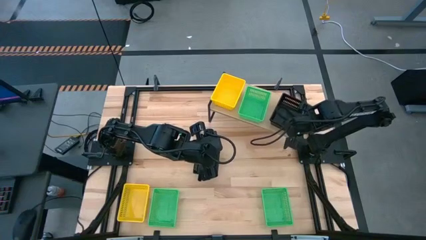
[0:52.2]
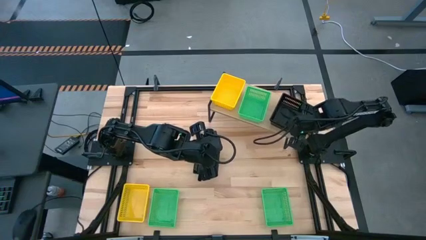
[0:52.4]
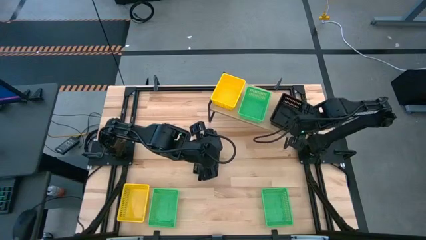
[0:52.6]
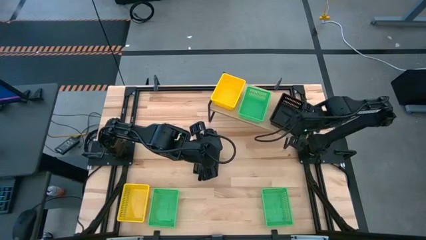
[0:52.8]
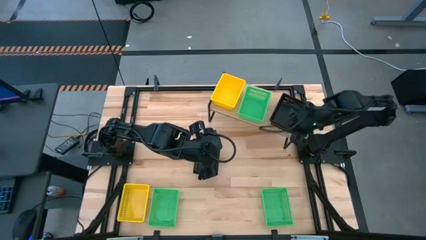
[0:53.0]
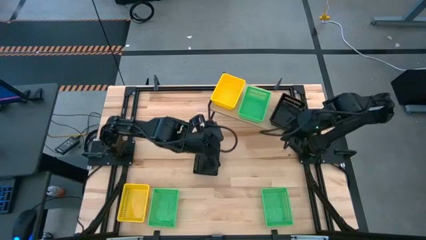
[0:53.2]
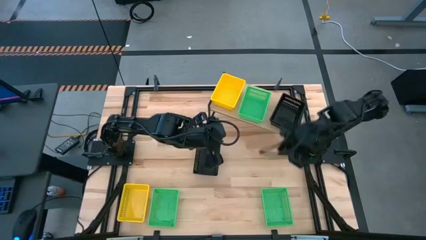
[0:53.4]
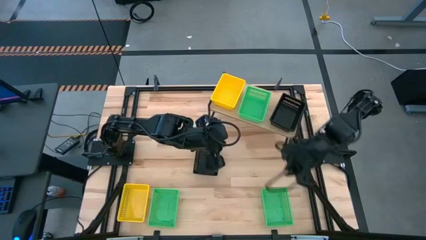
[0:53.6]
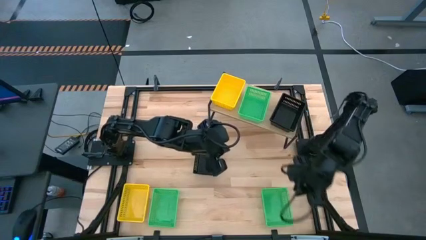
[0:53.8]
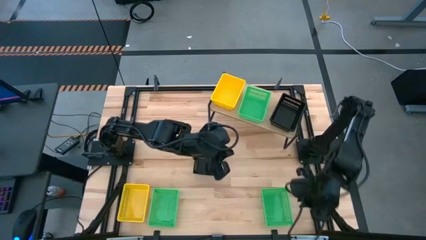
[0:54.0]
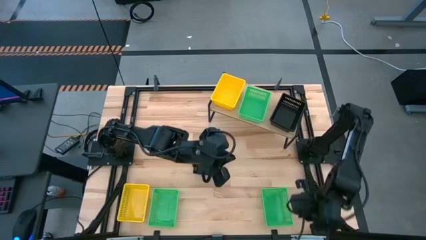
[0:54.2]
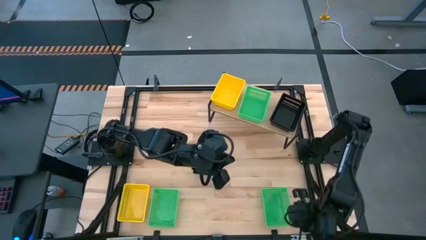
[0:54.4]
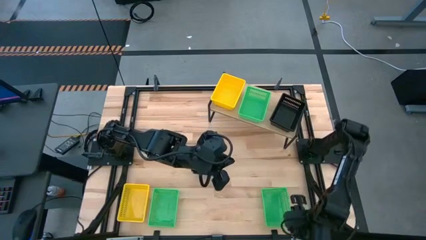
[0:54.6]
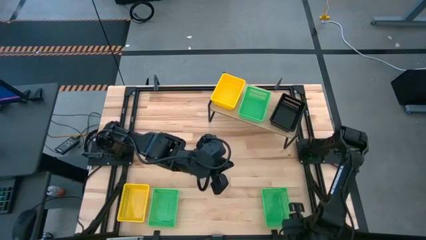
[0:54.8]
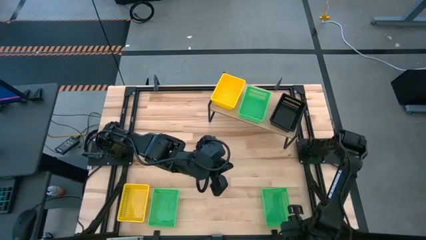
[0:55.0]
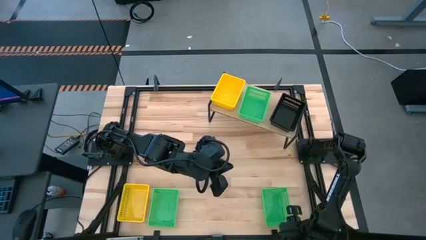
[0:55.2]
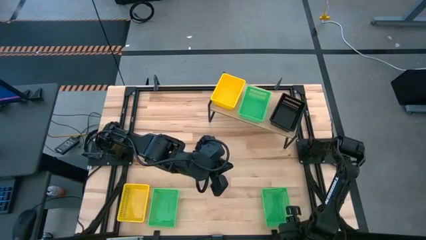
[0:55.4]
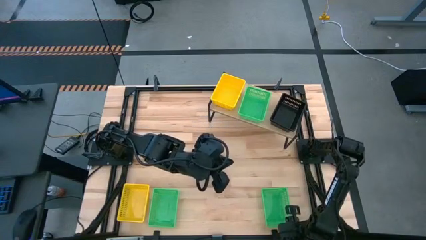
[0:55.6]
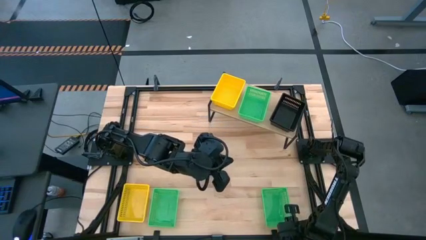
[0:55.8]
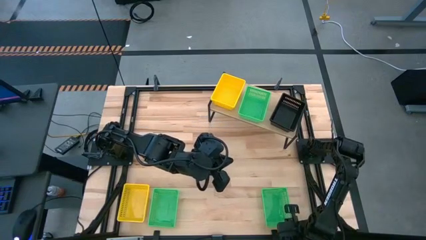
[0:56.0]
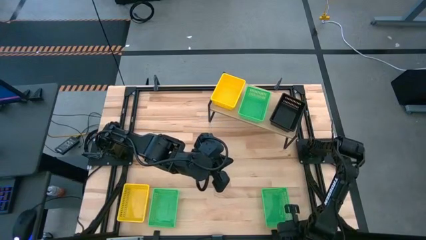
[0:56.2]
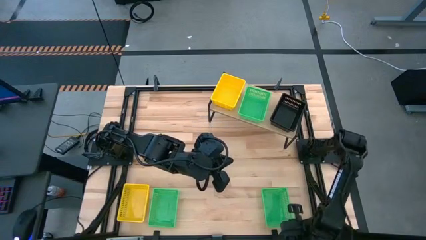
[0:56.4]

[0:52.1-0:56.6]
Task: Stack baskets on shelf by color
Stack the right green bin on the green bin

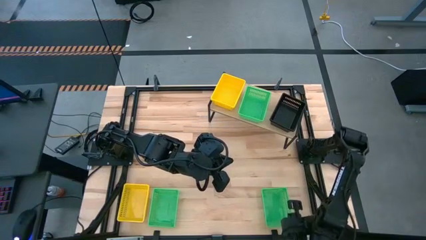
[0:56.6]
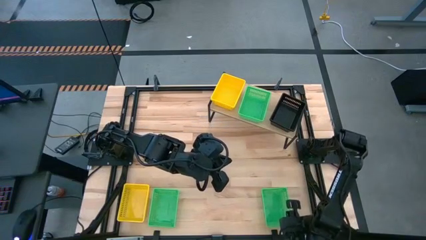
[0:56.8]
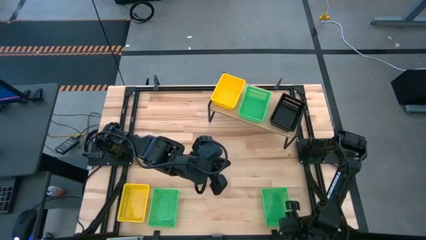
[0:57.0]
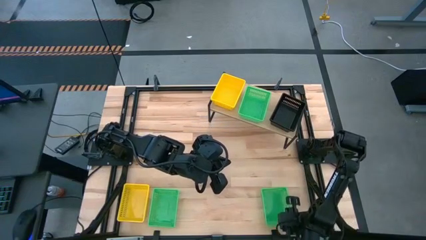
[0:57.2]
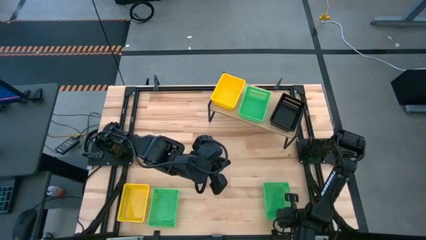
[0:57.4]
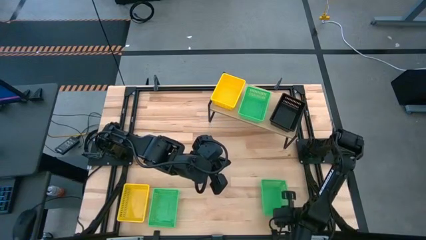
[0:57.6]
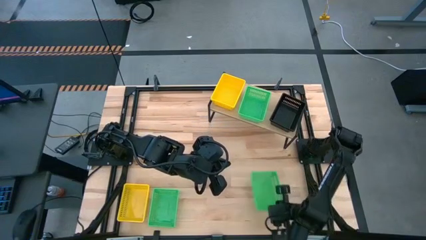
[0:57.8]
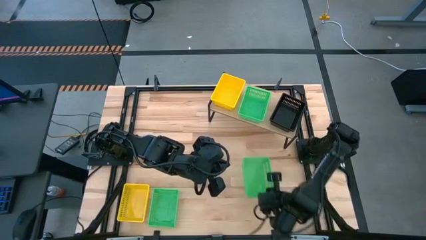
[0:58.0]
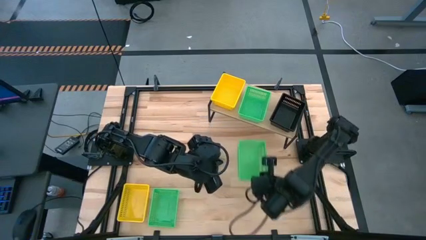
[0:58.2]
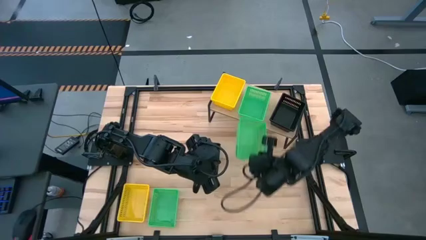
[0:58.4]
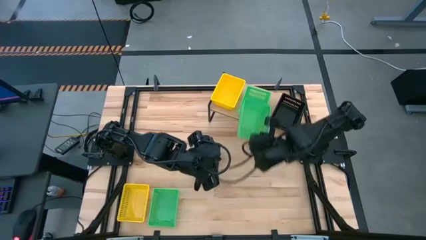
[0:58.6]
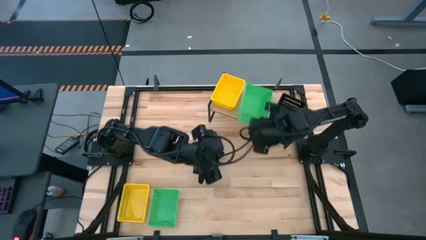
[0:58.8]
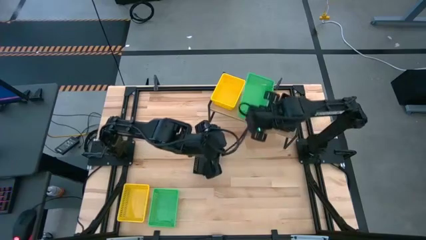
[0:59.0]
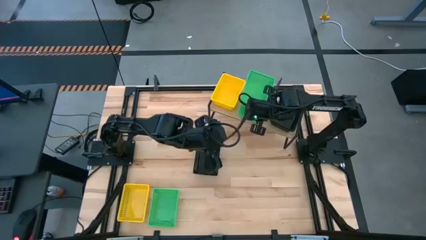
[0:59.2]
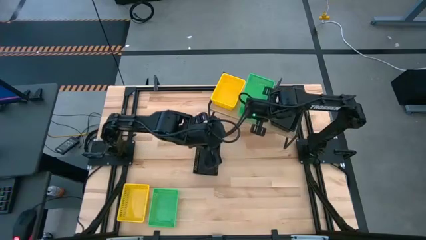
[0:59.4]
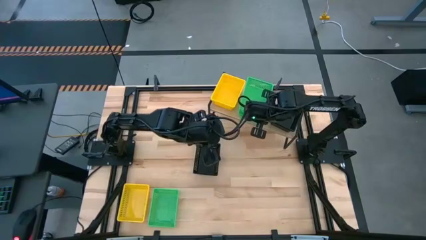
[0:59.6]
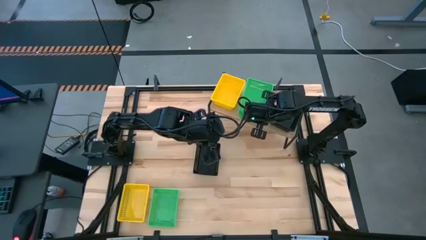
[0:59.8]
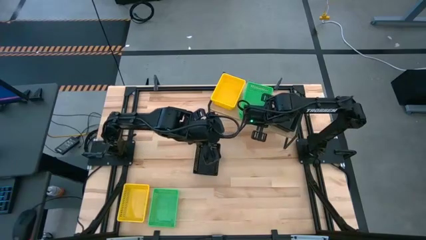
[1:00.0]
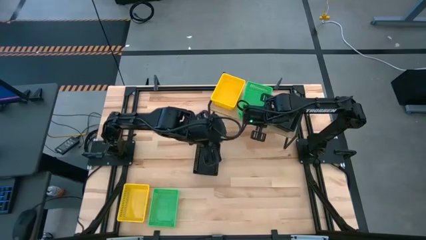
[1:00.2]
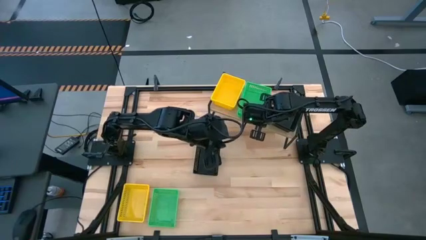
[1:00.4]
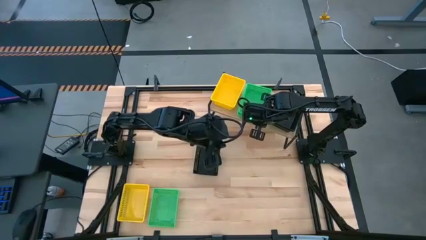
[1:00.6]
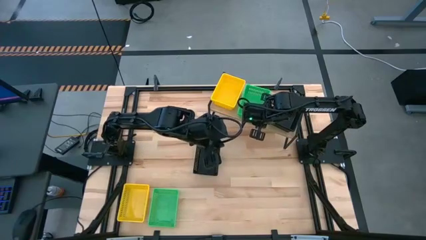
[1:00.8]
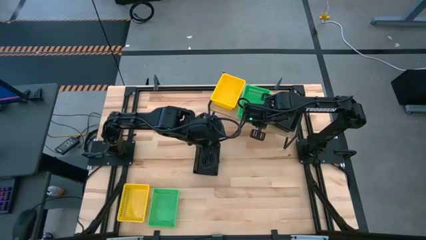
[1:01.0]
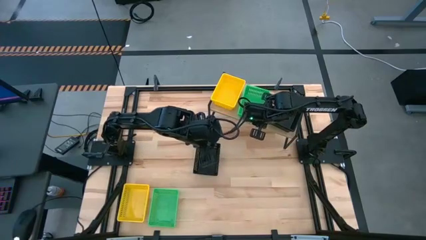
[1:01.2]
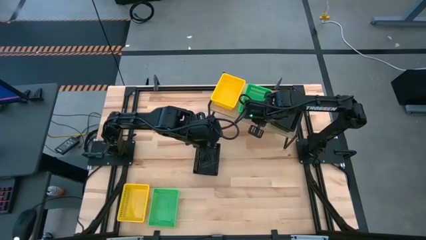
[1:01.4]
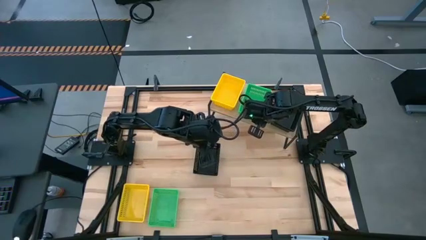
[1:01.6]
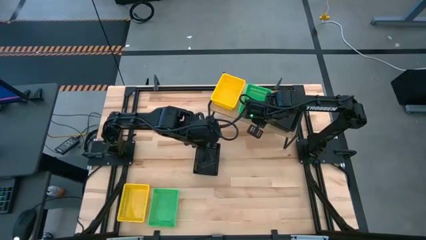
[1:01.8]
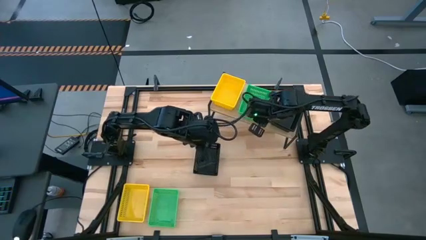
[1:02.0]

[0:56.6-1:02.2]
Stack the right green bin on the green bin

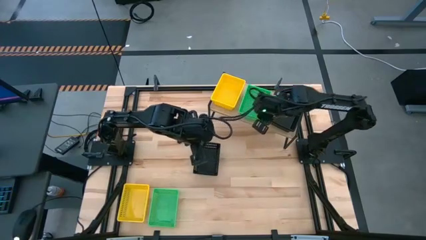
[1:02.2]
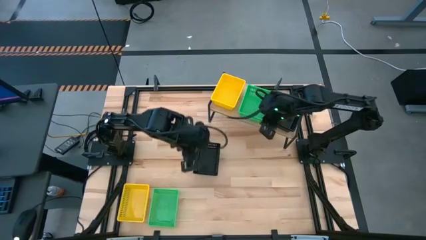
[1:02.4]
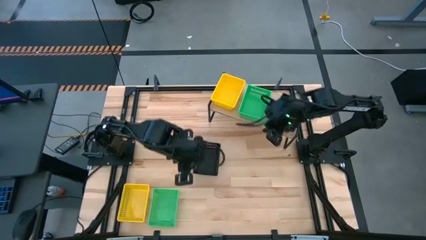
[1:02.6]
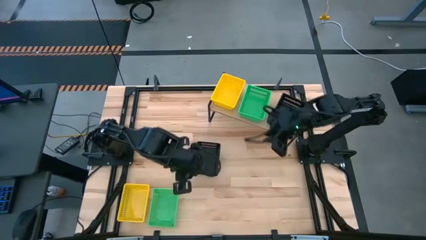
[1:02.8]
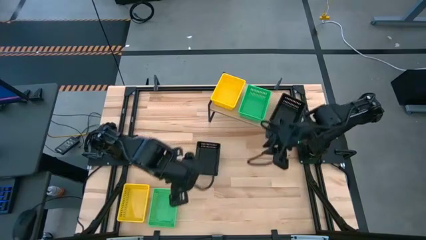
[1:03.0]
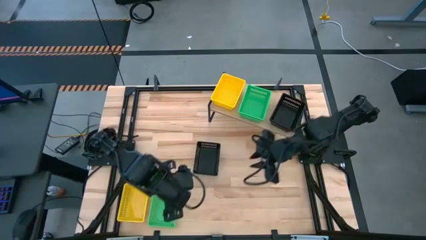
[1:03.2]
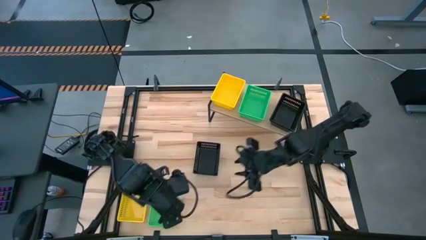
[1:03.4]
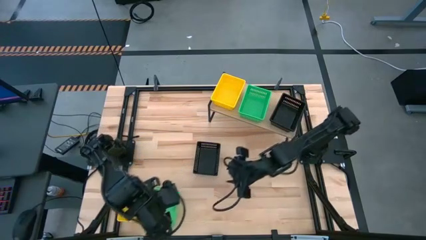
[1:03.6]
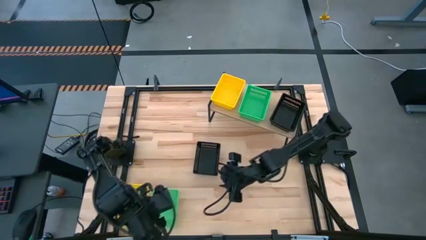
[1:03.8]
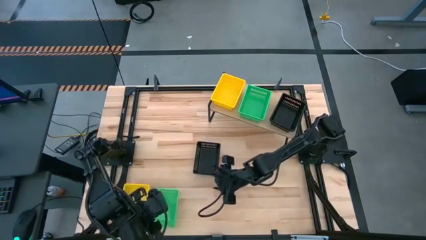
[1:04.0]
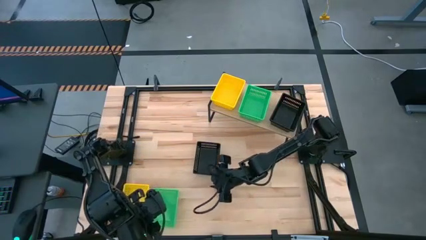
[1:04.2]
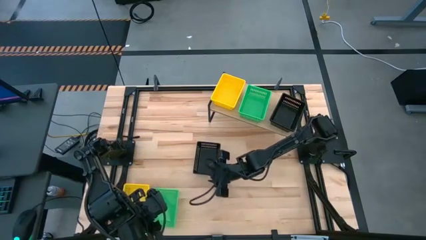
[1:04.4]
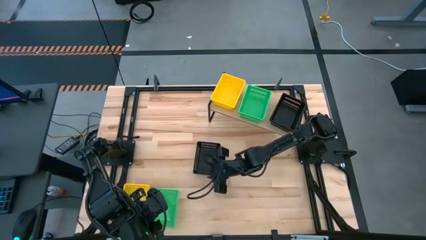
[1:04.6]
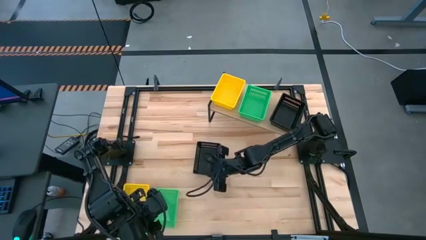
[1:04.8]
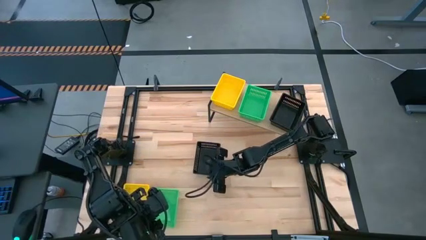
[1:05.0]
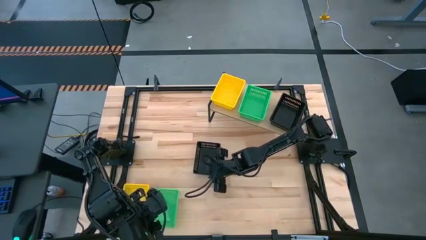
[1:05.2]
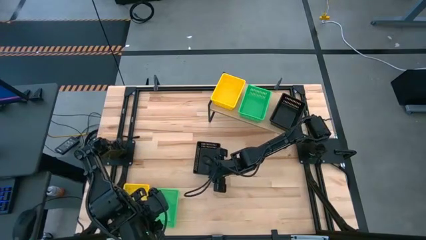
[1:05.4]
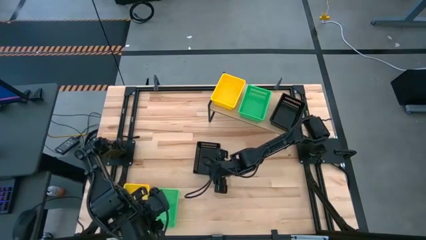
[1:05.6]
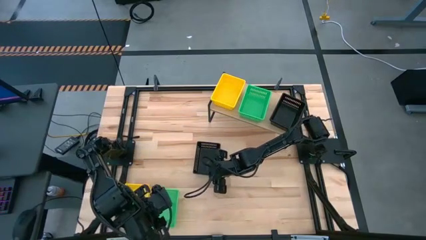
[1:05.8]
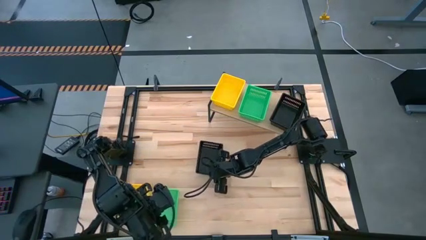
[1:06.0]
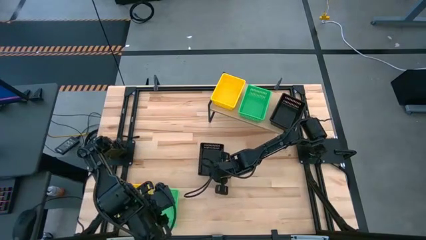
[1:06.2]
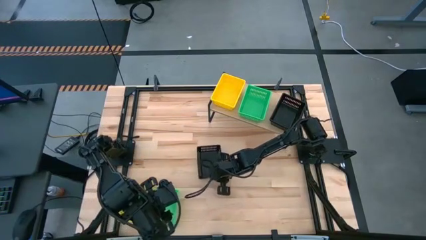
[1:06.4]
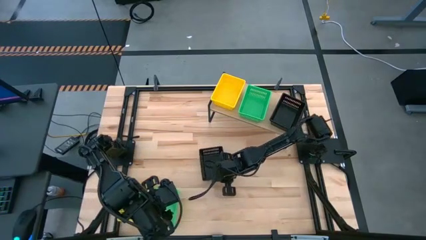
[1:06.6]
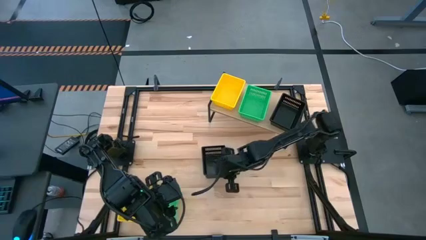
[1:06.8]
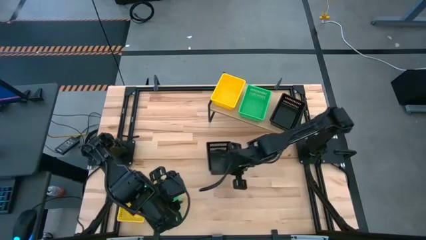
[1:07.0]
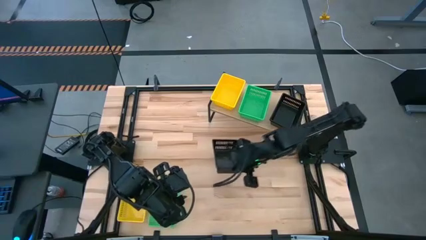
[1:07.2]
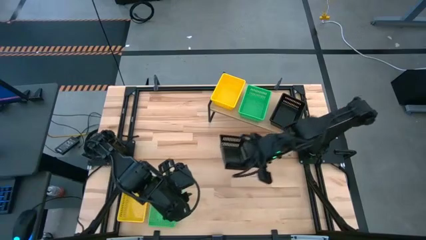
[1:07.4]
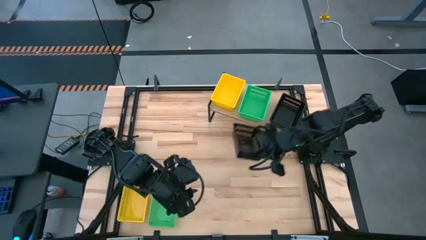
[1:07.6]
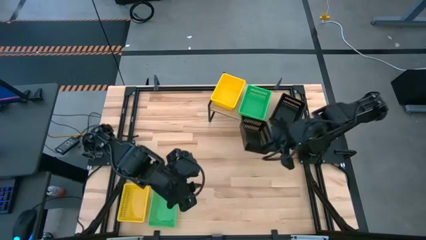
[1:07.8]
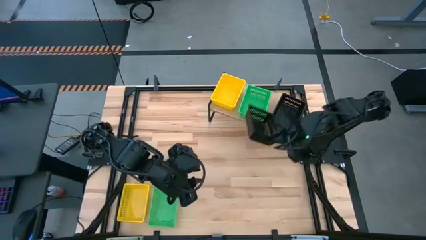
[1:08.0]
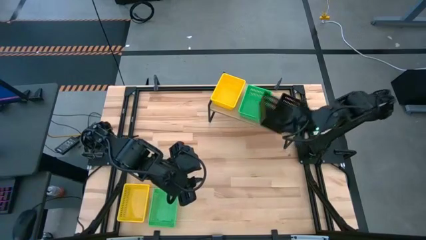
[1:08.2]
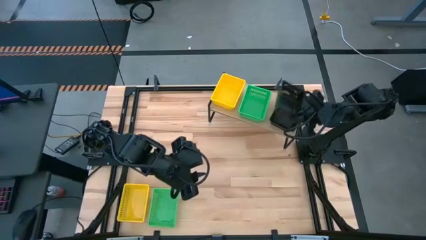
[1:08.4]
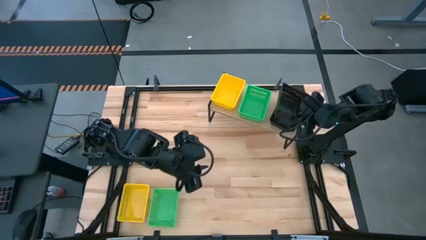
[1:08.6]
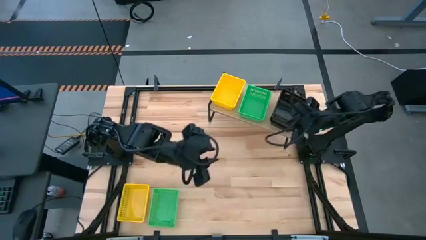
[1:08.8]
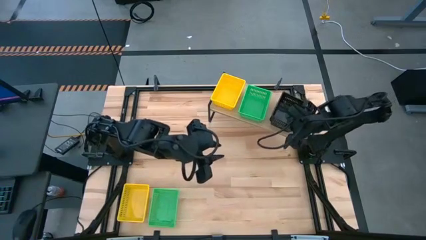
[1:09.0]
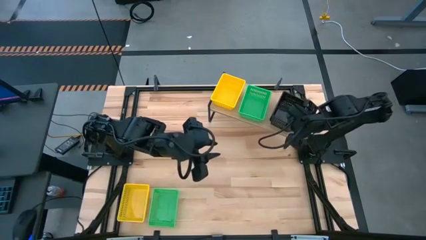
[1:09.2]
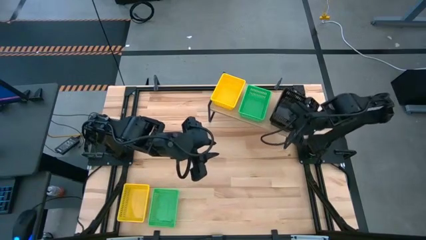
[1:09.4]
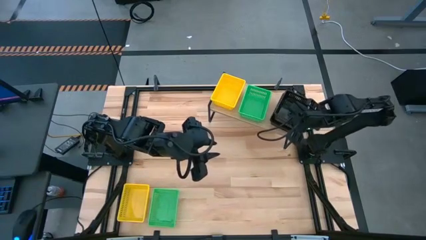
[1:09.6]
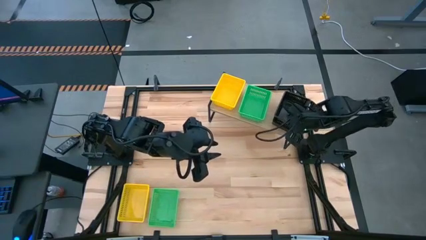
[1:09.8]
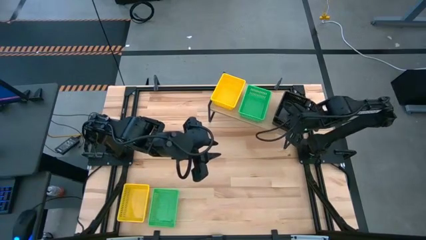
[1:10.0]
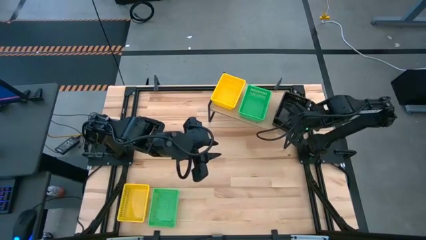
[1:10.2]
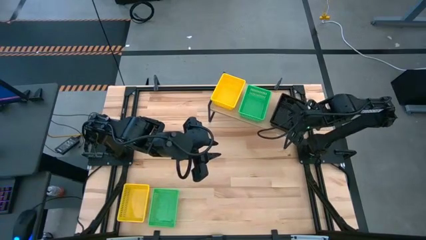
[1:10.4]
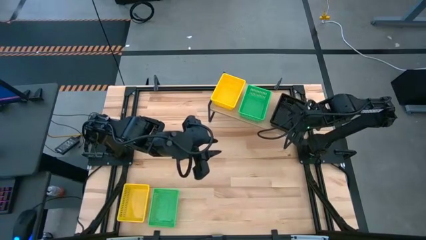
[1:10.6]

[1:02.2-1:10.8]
Stack the black bin on the black bin
